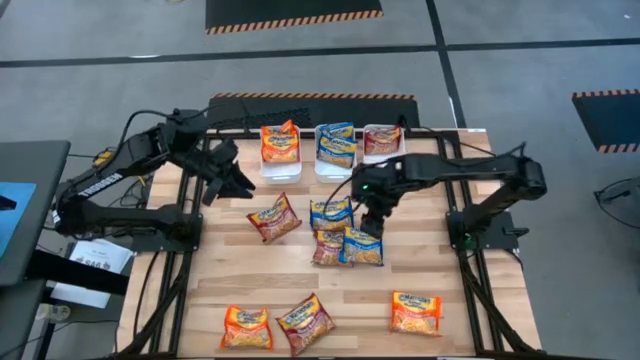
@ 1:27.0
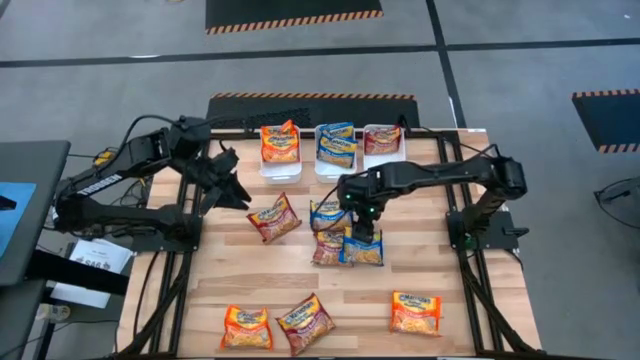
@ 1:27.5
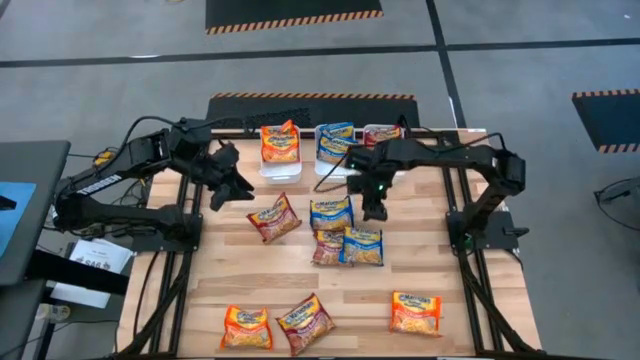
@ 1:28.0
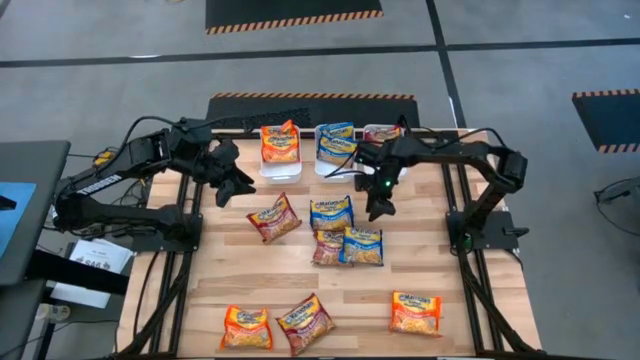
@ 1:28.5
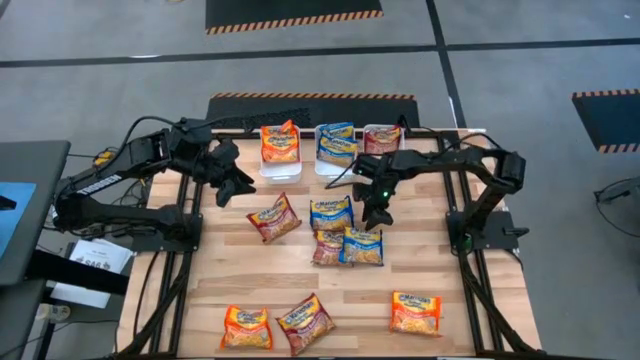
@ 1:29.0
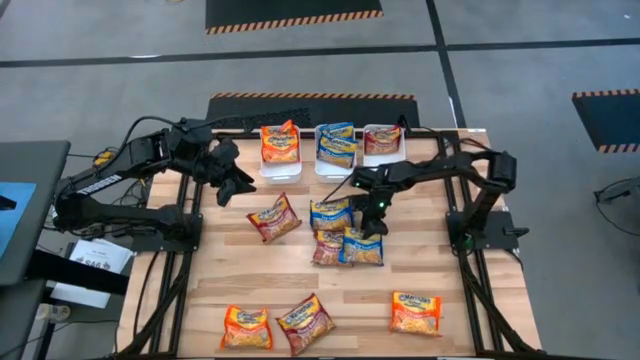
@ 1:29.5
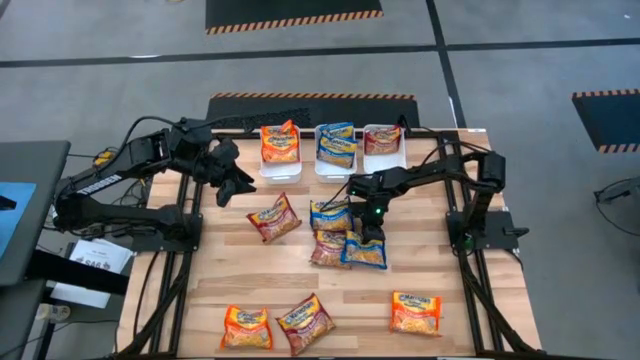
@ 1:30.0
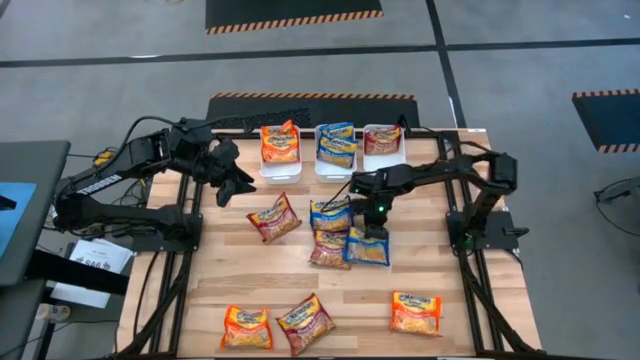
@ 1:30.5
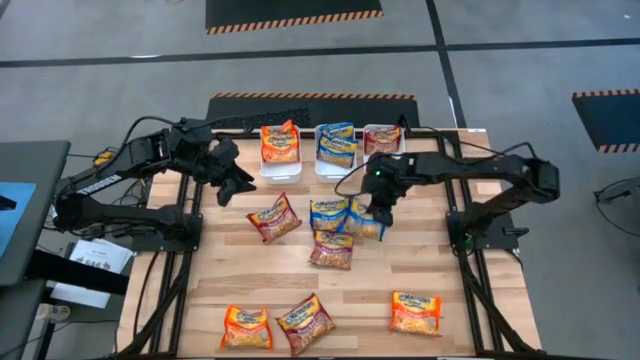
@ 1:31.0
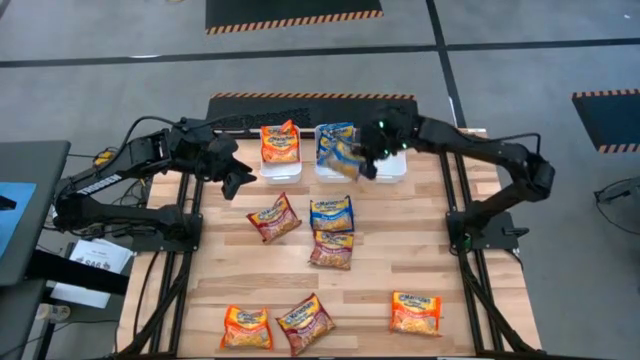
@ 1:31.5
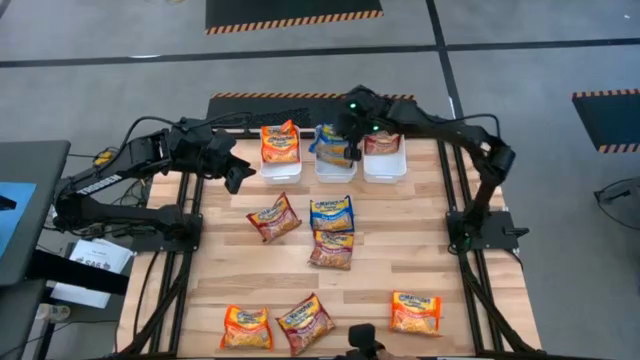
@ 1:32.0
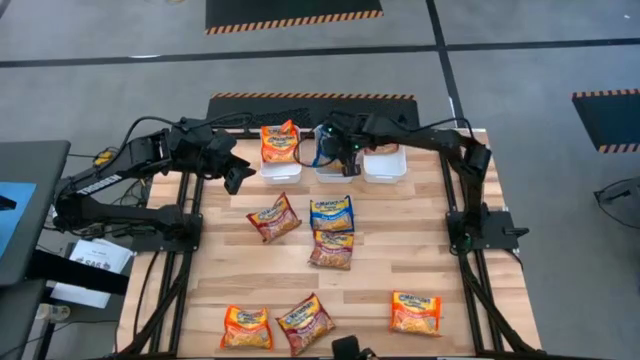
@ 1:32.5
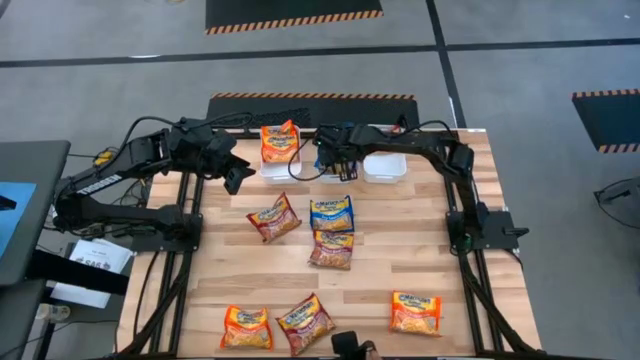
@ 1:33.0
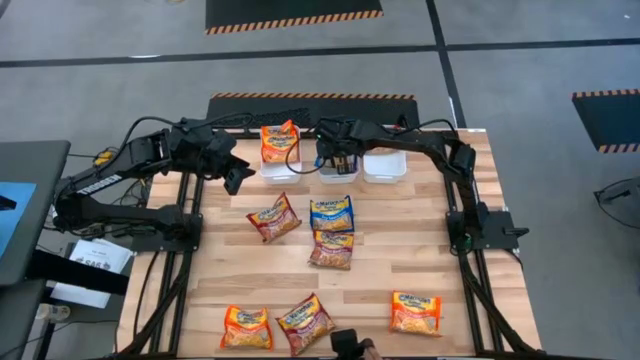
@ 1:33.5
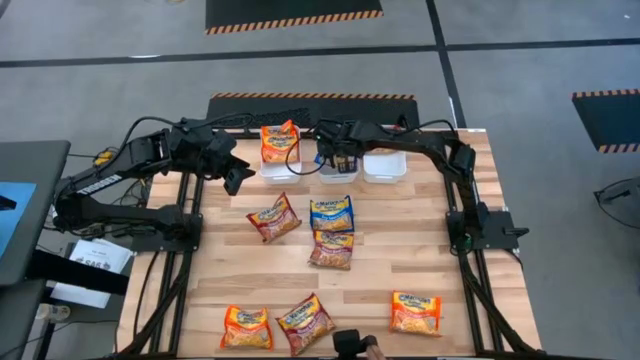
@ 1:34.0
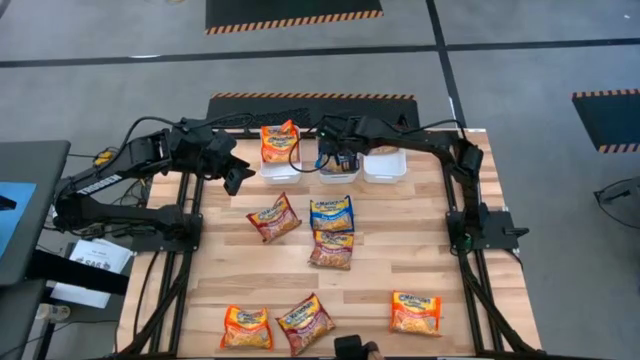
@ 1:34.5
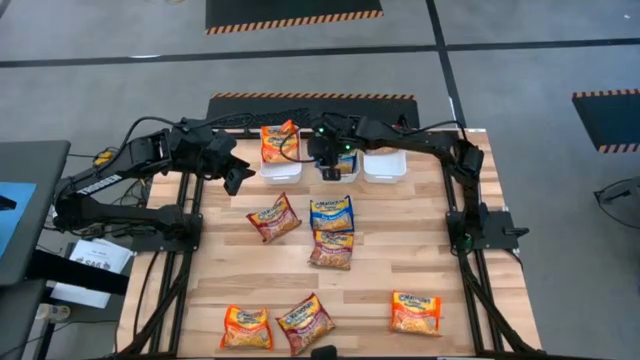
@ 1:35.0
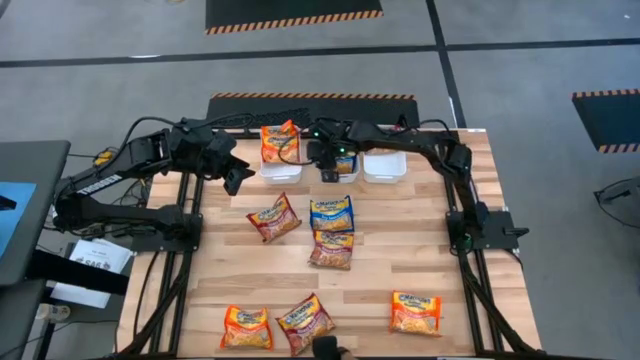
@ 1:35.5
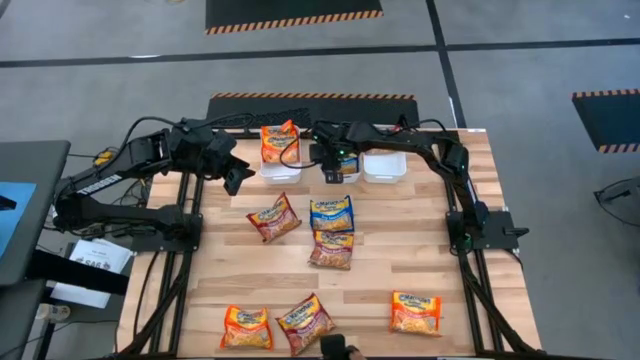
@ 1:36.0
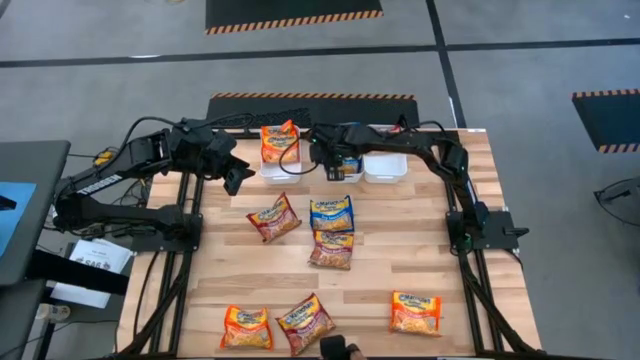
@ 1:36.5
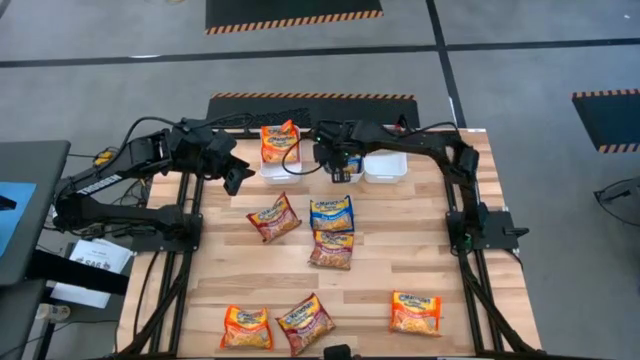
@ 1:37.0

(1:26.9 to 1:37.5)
Task: Sort Maruchan noodles
Put the bottom blue noodle soup pack into the middle white bin

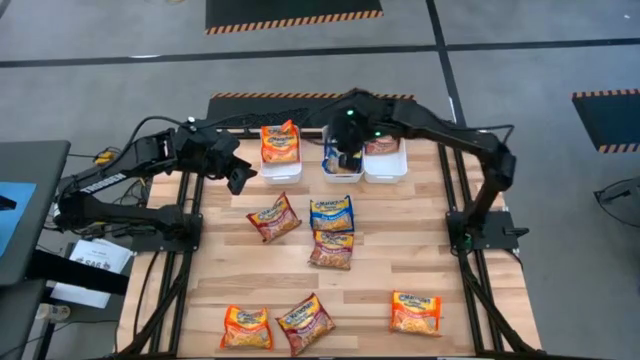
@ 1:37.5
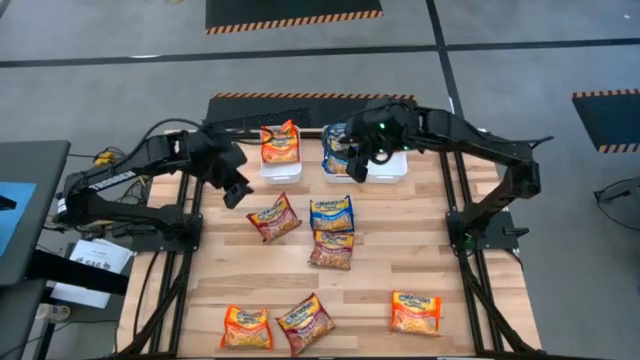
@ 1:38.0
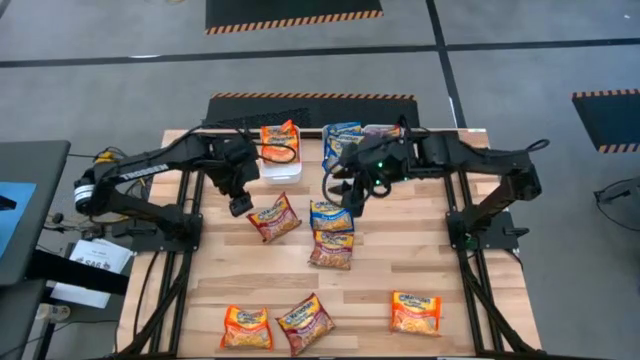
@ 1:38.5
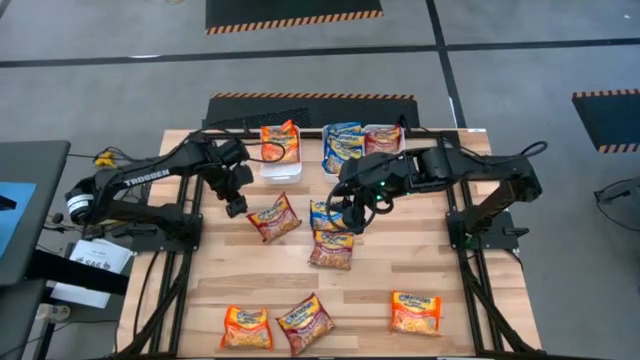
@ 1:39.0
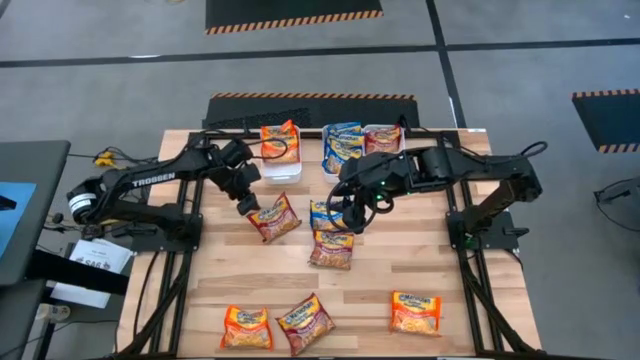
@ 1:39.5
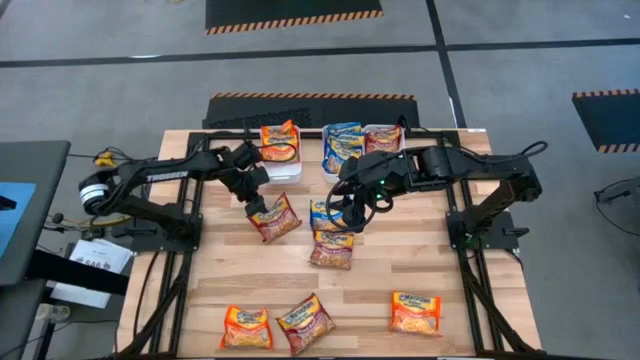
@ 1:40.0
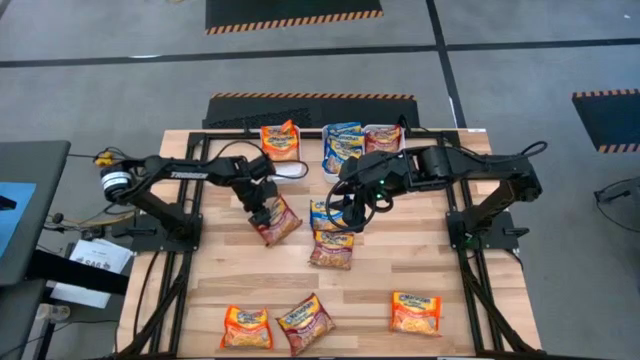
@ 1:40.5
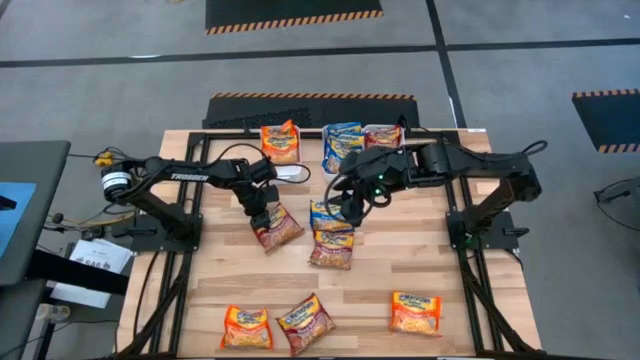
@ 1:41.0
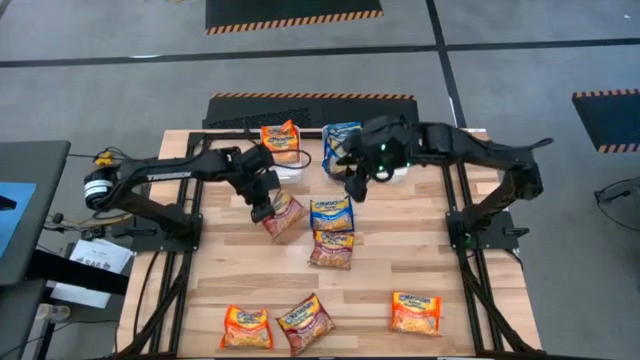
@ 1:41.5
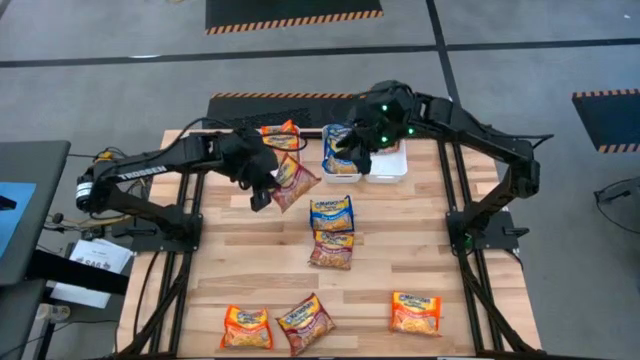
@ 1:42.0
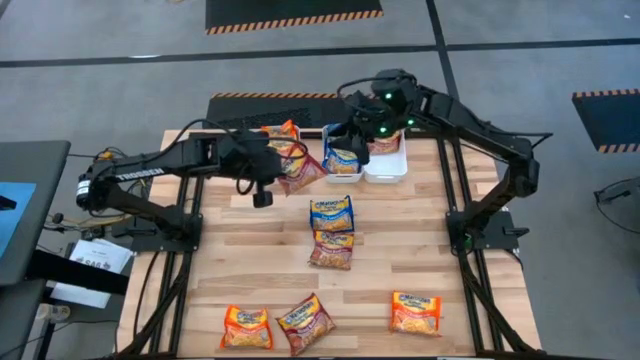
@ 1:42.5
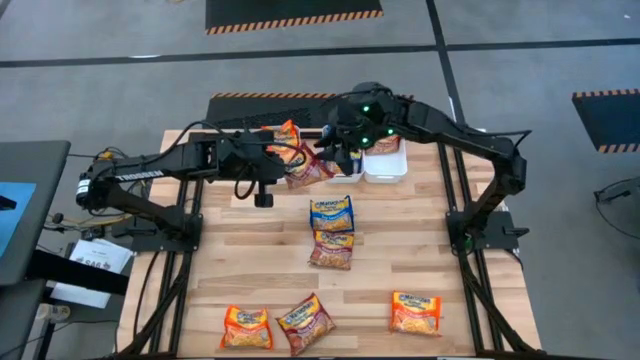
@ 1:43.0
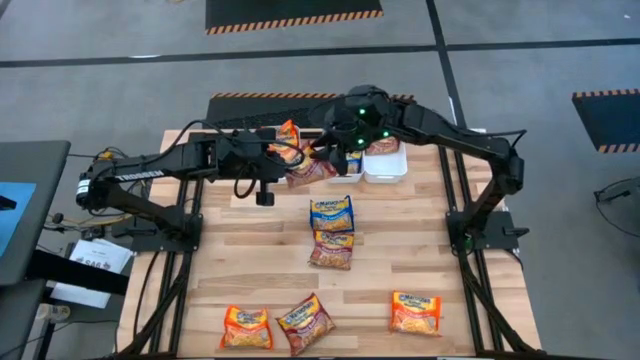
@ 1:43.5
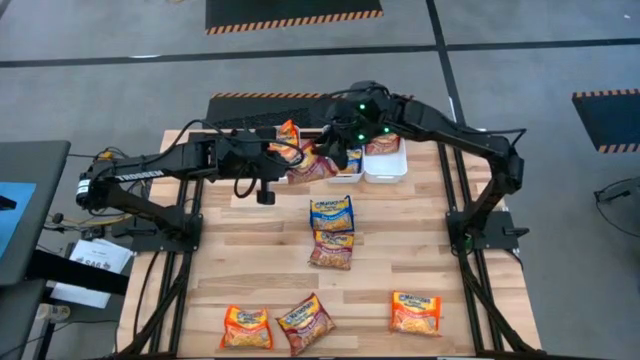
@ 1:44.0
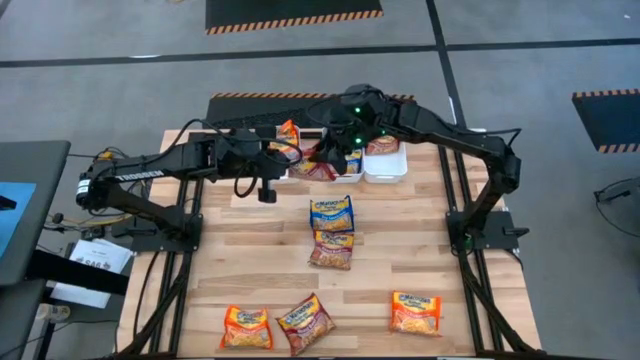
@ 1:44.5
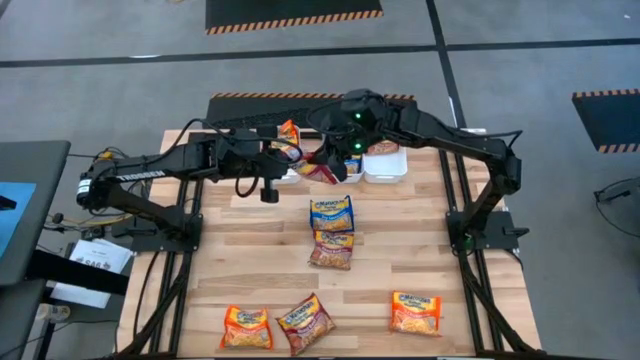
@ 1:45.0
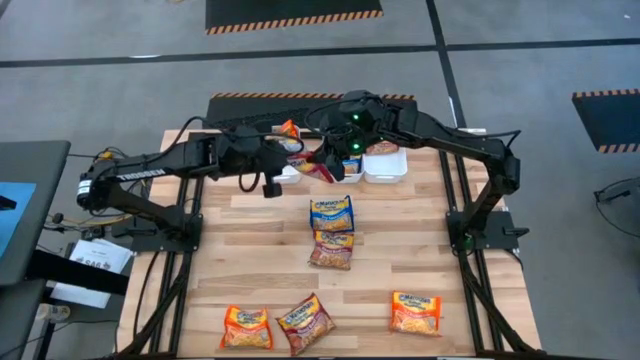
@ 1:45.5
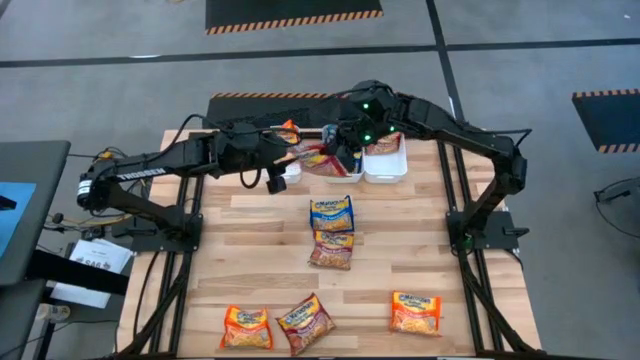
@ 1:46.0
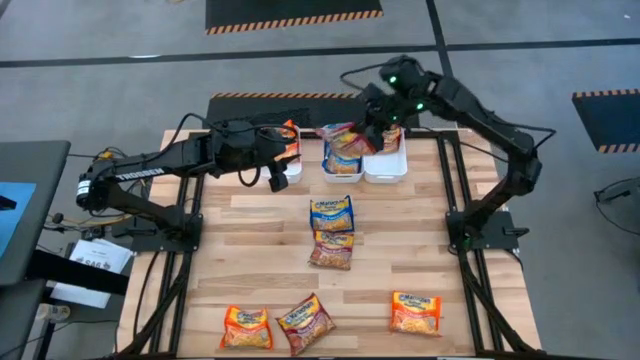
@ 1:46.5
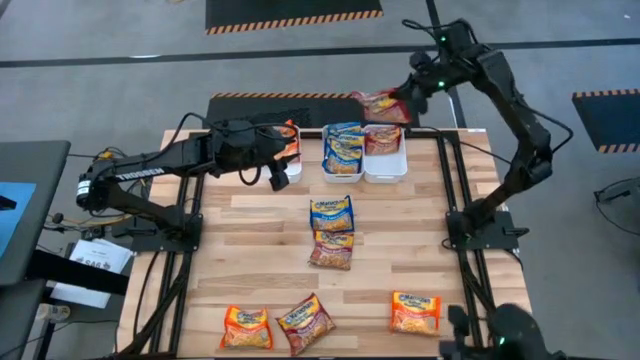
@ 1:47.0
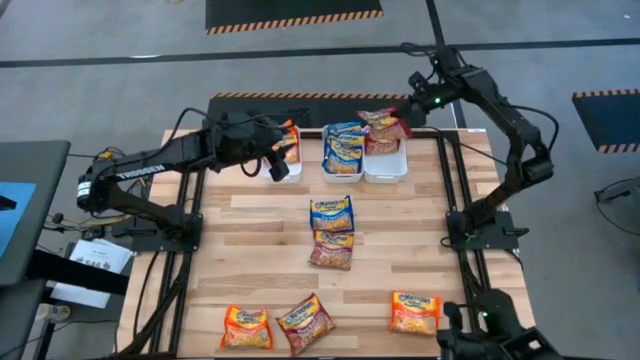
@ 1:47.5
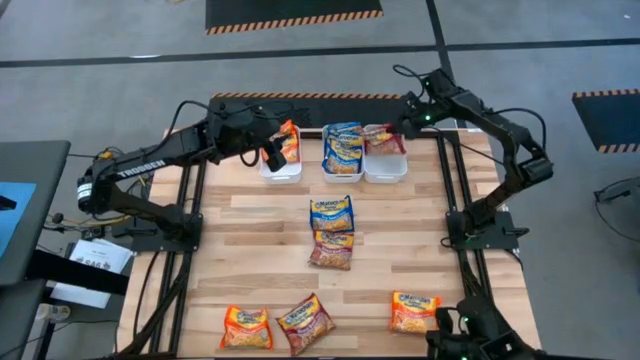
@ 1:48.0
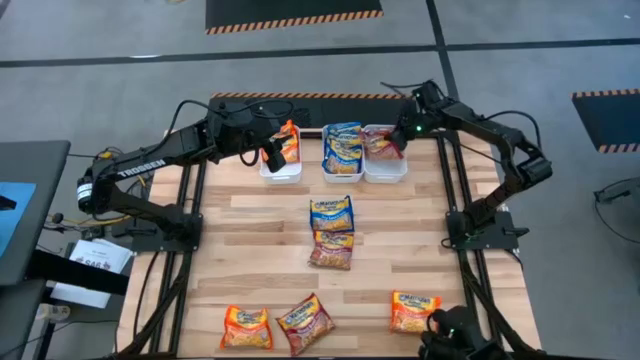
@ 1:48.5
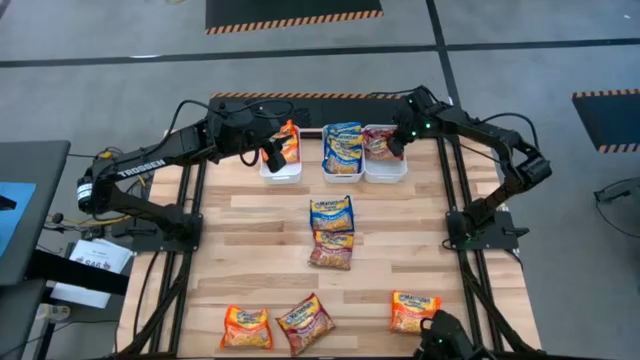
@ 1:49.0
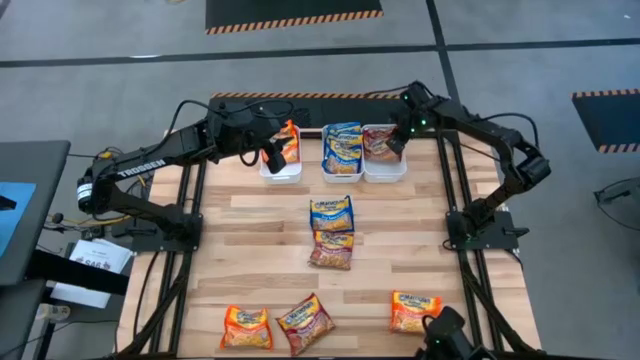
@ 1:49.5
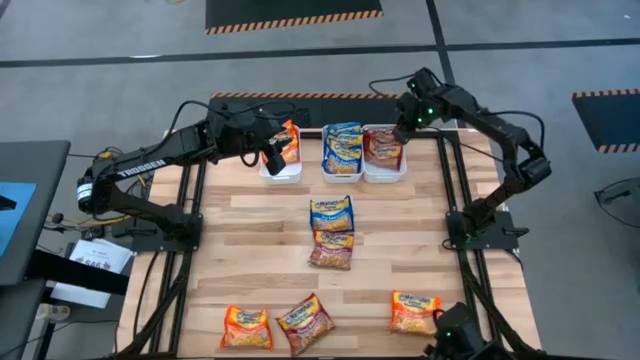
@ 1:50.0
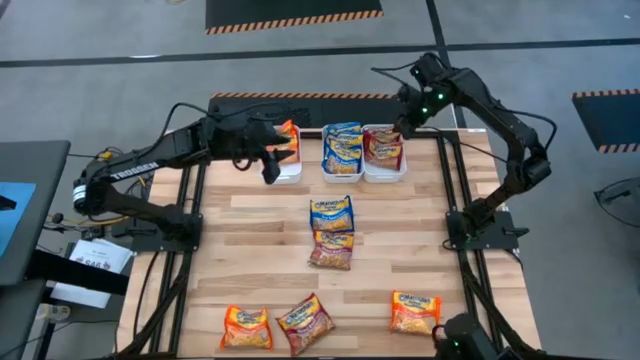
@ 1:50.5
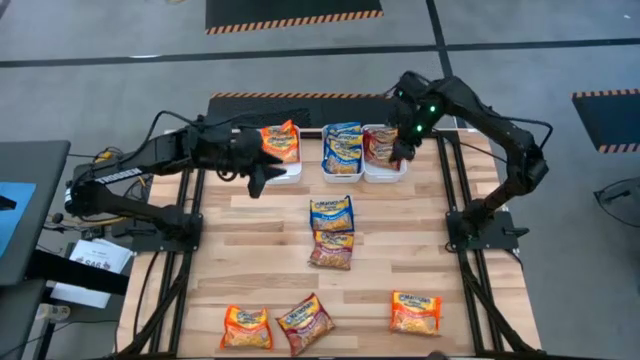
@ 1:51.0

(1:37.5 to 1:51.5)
Put the top red noodle soup pack into the right white bin
